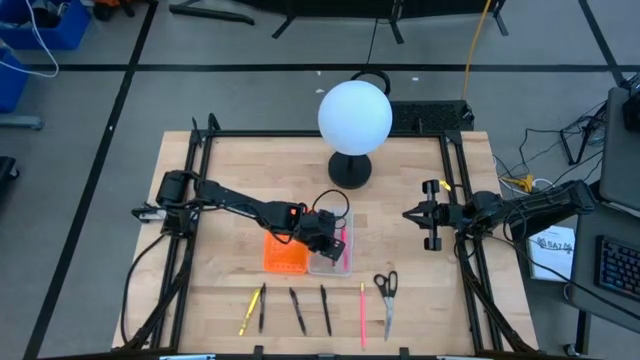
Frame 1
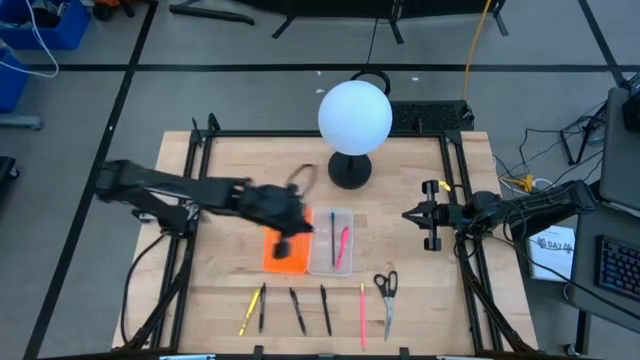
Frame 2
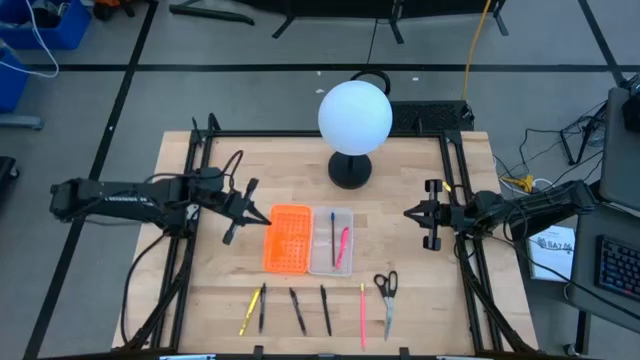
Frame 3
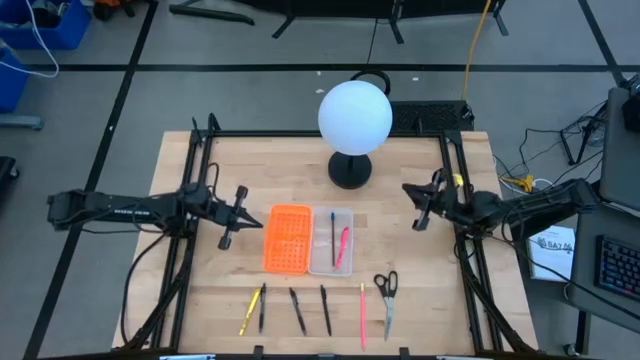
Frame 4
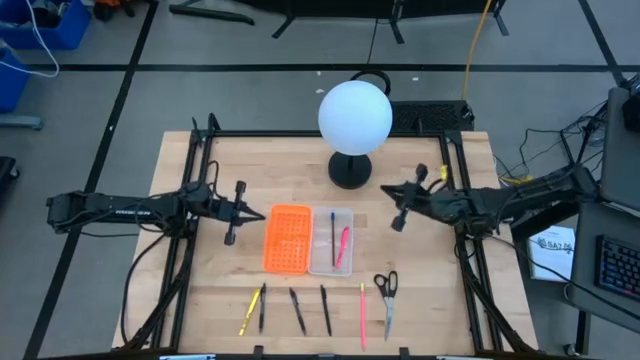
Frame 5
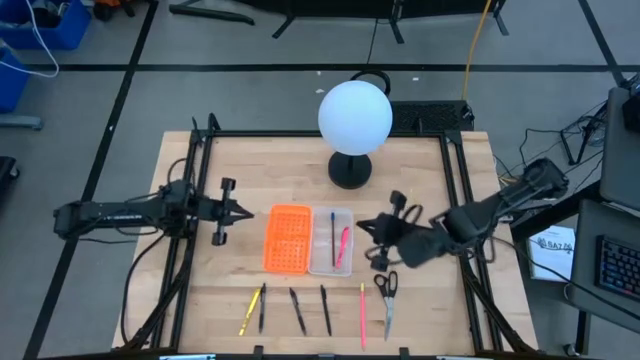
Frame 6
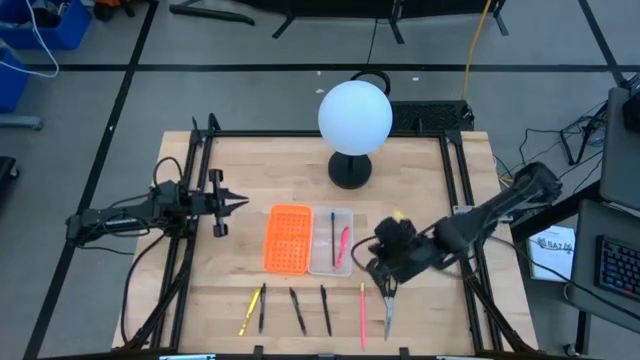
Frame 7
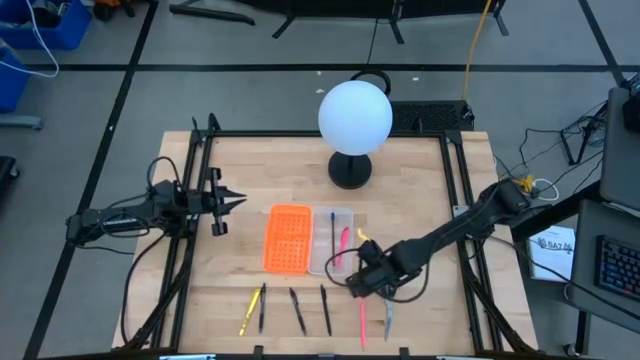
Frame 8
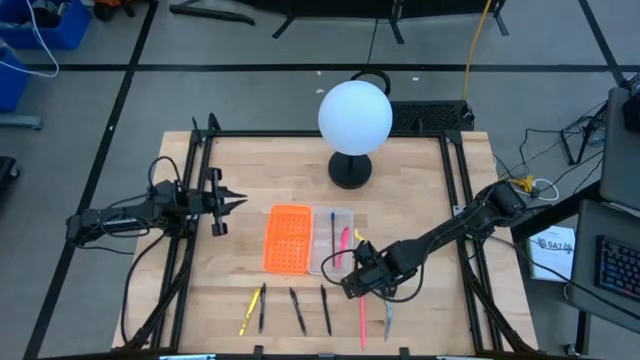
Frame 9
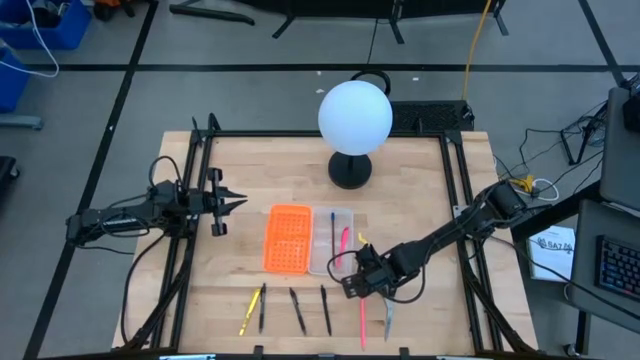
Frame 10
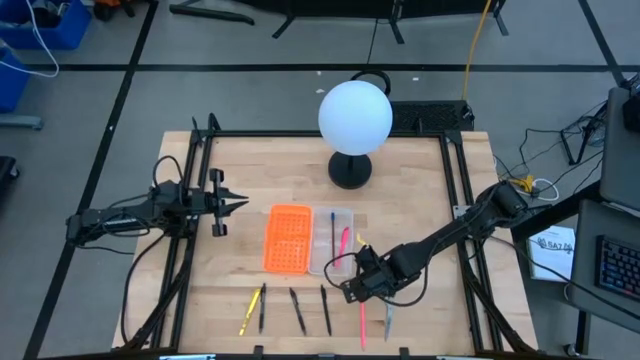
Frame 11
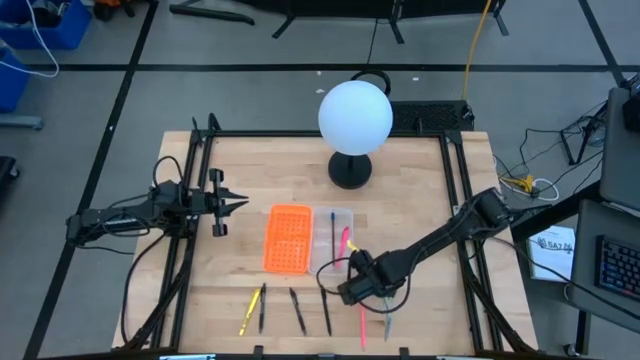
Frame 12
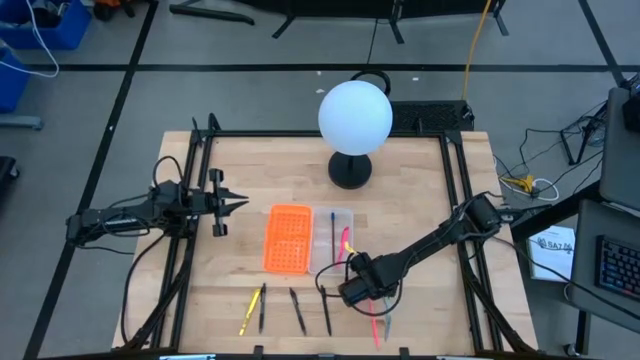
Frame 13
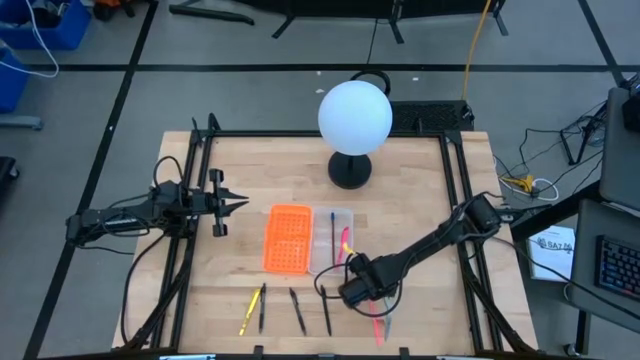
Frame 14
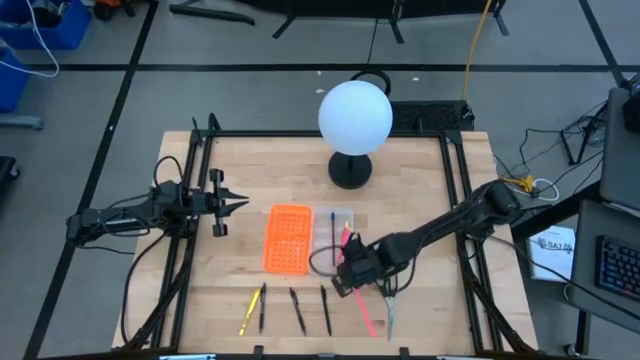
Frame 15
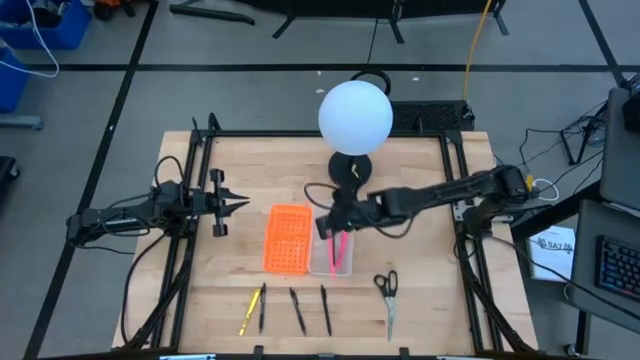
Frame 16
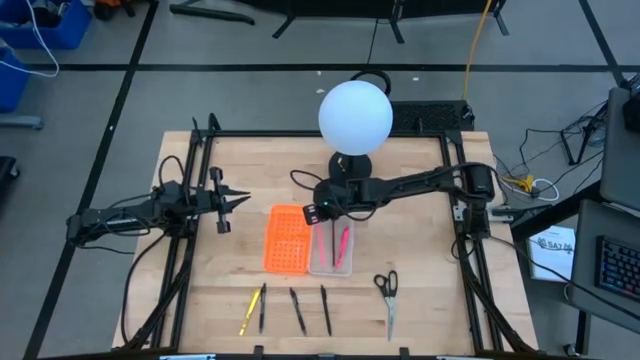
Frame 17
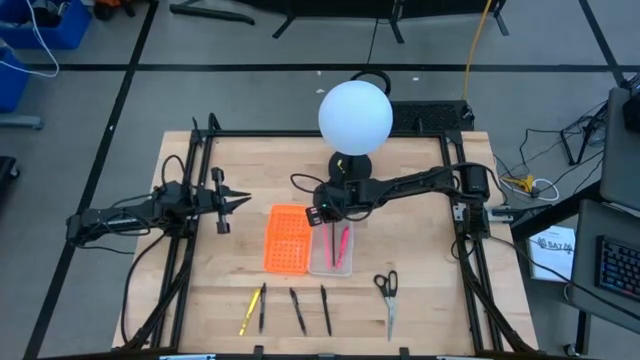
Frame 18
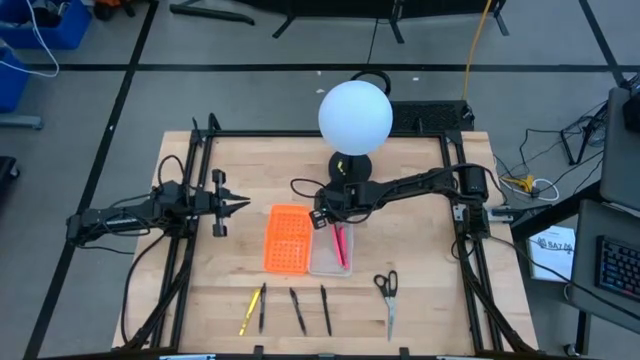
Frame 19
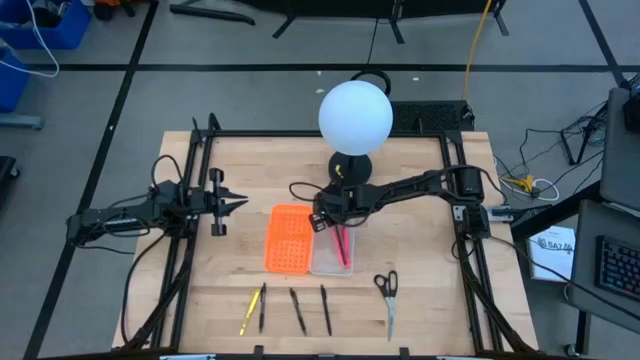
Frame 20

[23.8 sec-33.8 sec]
Task: Pick & place school supplies into a supply box
Put the pink pencil into the supply box

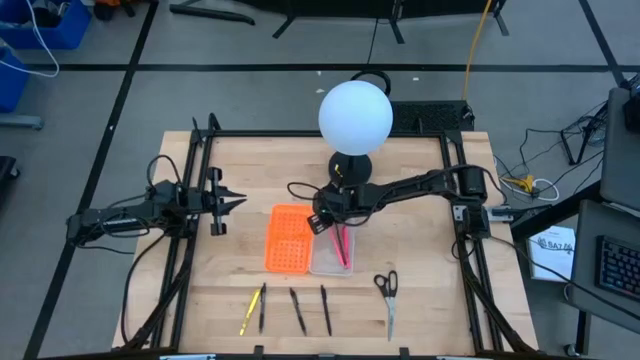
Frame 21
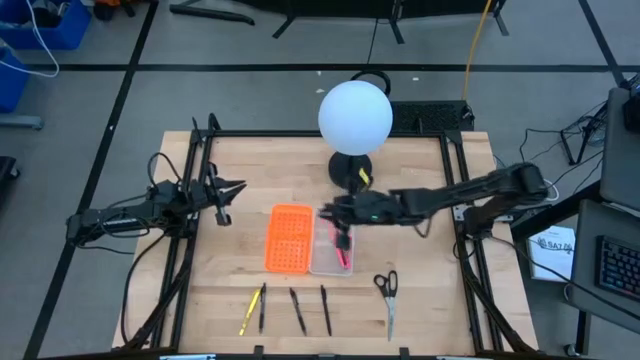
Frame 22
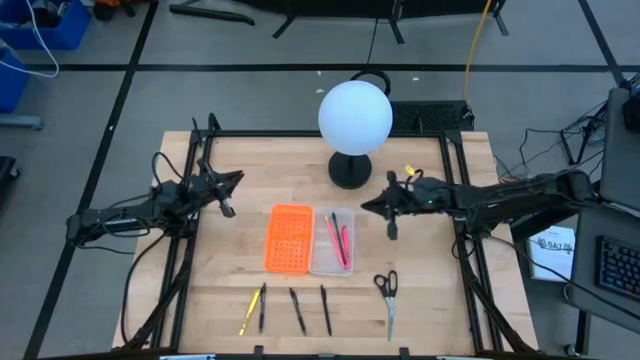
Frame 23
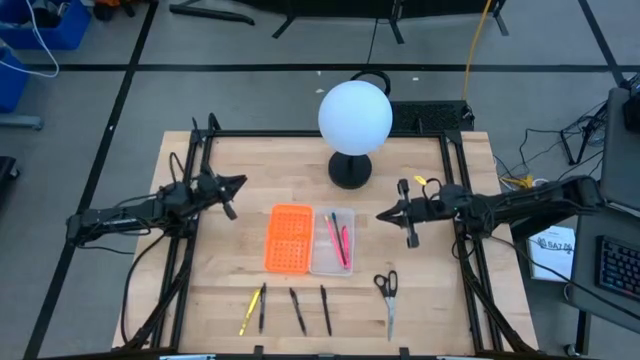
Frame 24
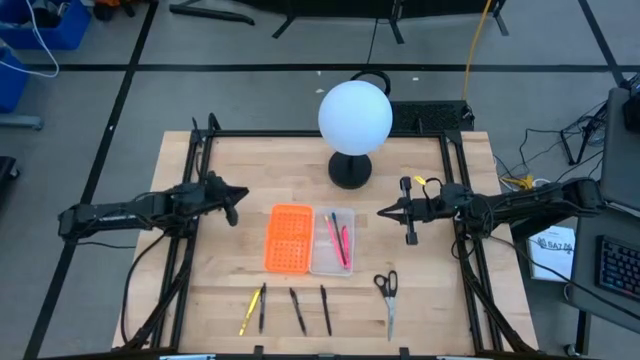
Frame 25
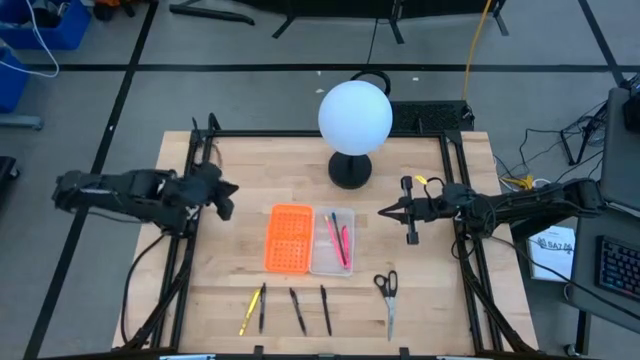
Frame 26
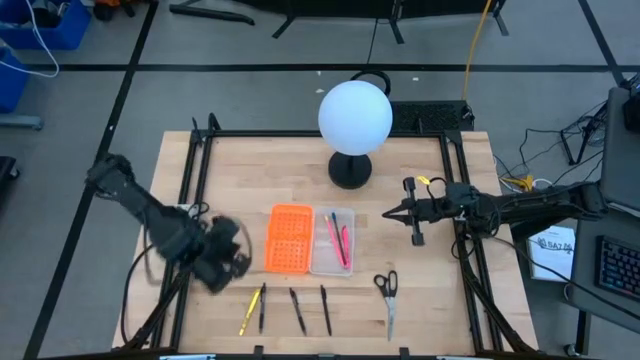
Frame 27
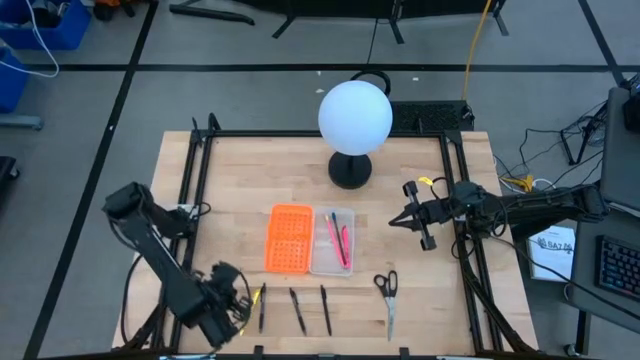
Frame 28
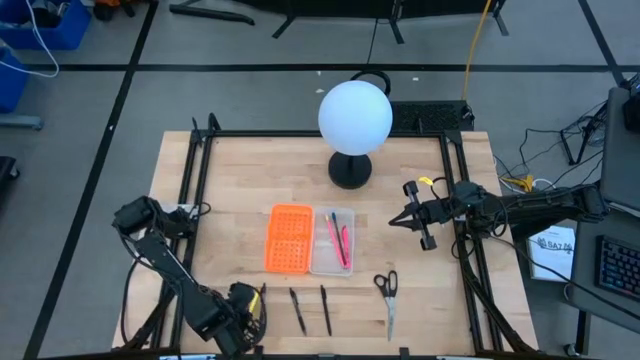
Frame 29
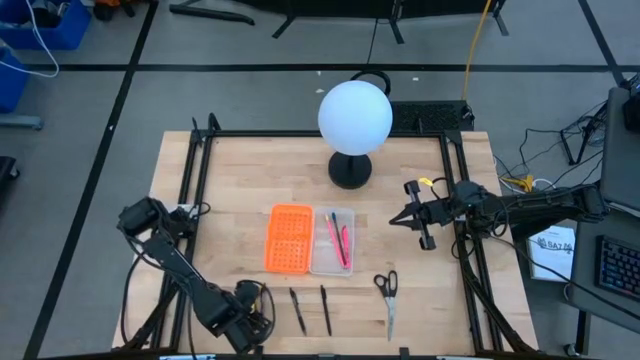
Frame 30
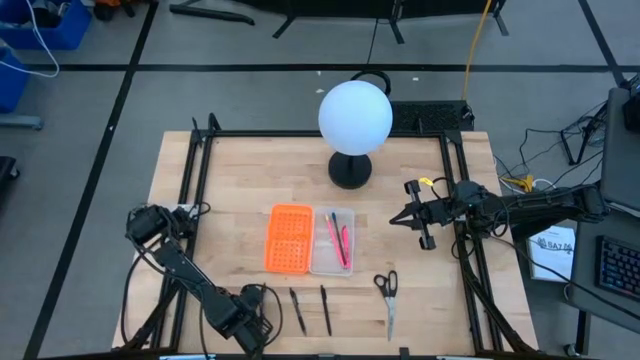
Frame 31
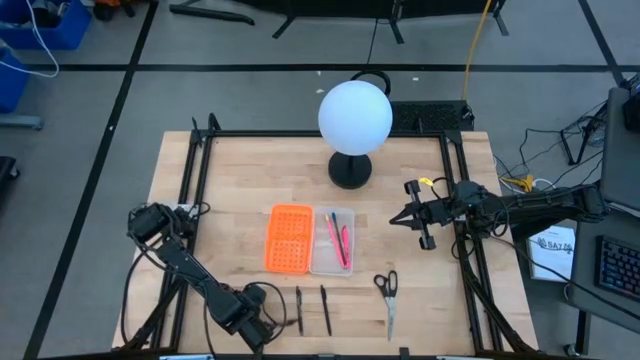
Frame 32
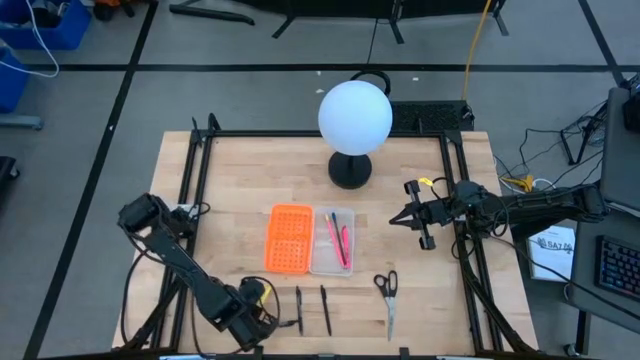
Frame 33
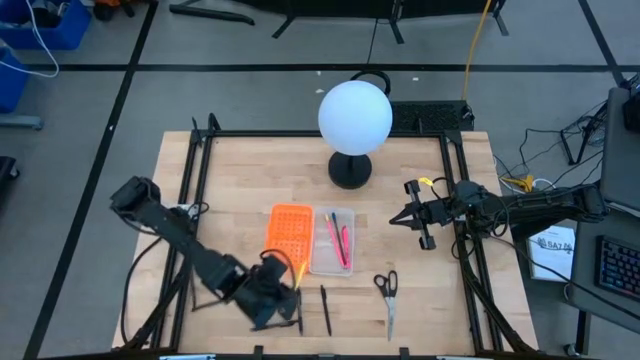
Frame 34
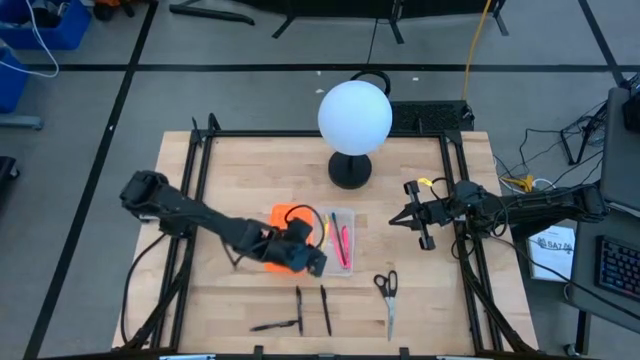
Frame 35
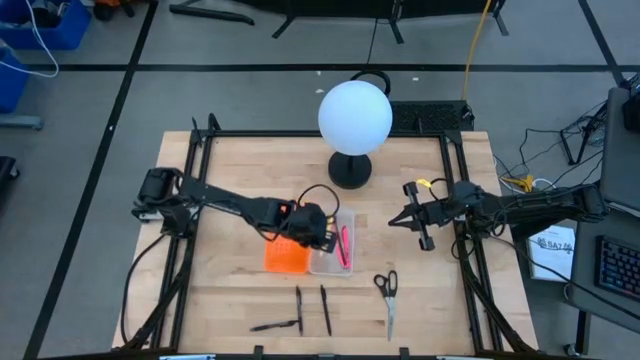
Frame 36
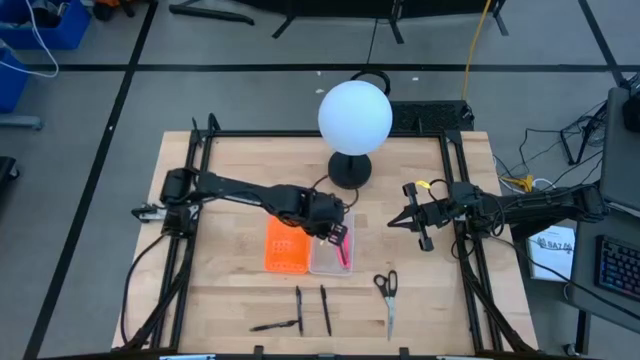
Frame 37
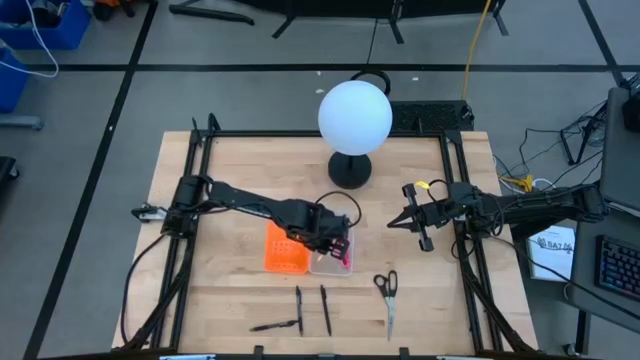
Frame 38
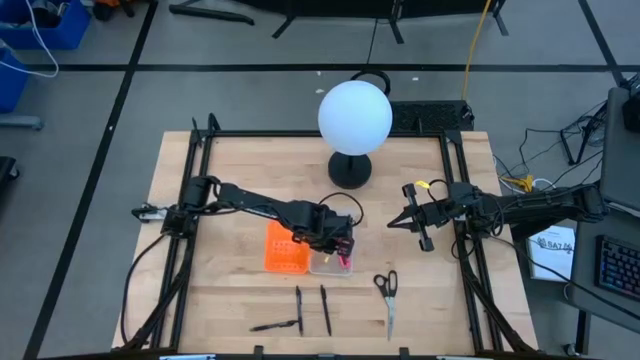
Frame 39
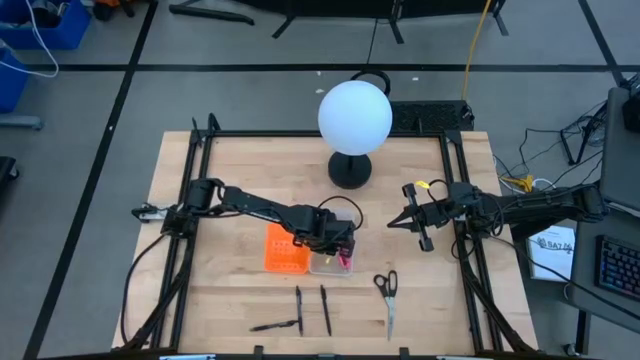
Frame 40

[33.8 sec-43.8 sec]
Put the yellow pen into the supply box

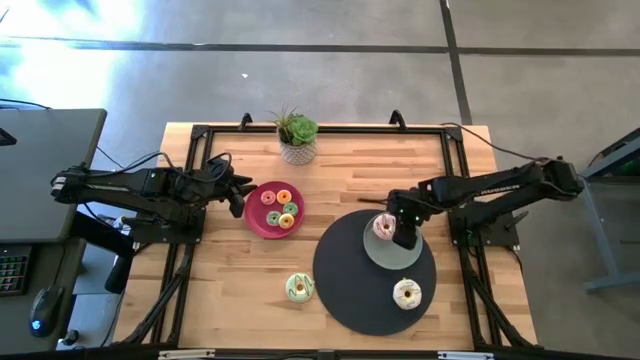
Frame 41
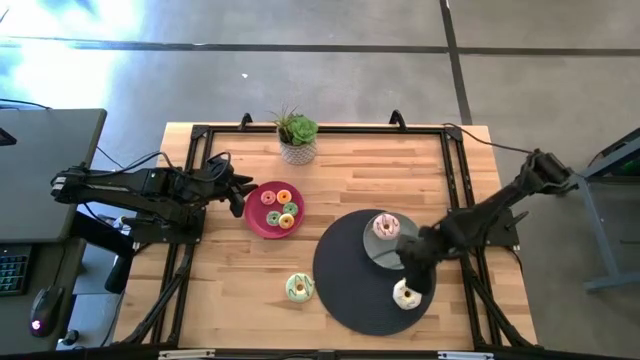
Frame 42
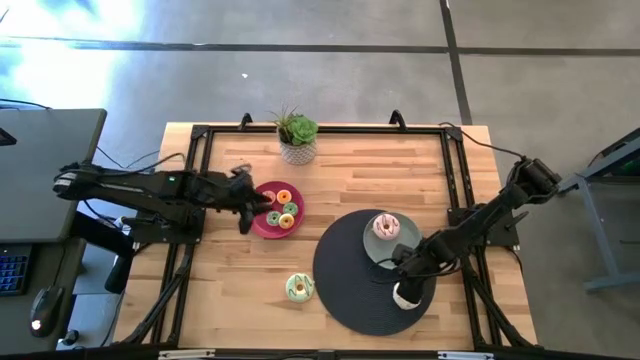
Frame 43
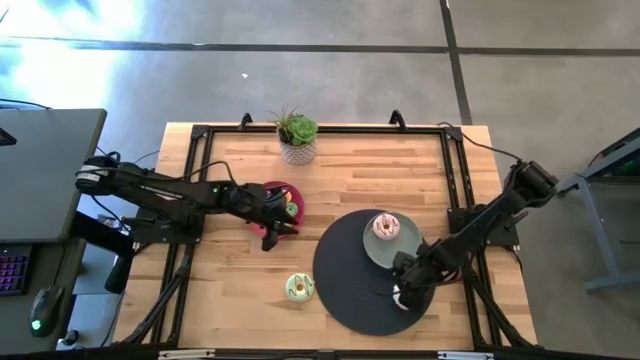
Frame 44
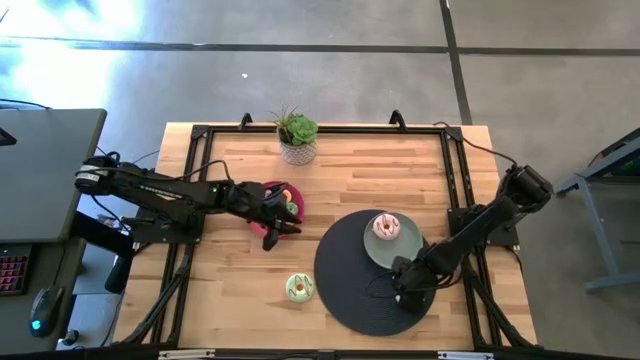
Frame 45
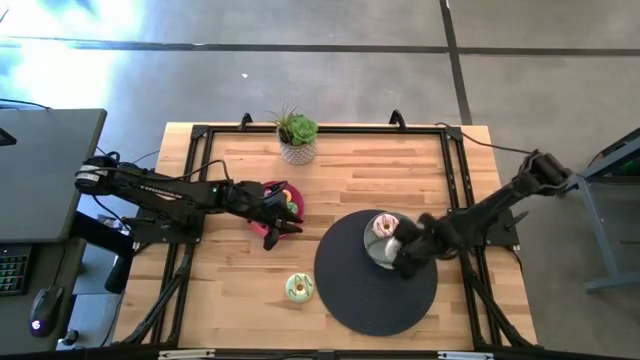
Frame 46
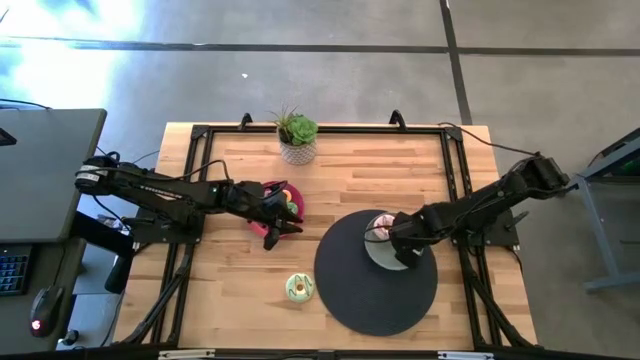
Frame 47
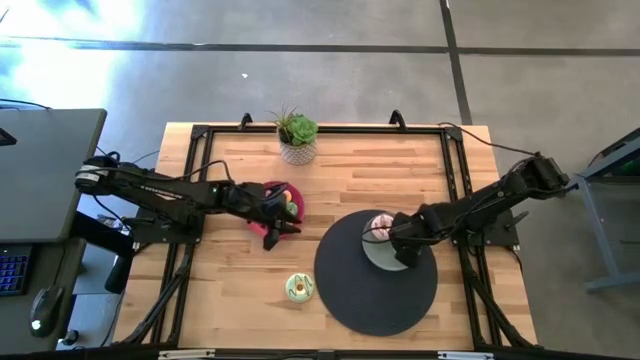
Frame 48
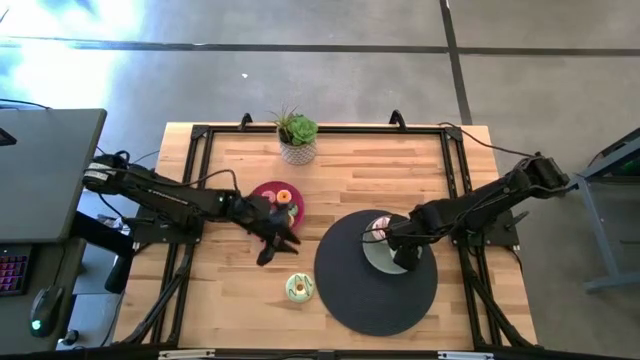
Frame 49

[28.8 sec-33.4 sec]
Task: Pick & Place donuts
Put the large white donut on the blue plate
